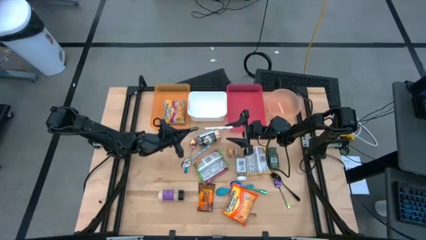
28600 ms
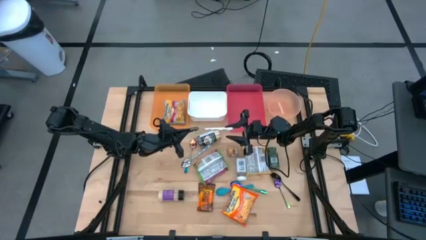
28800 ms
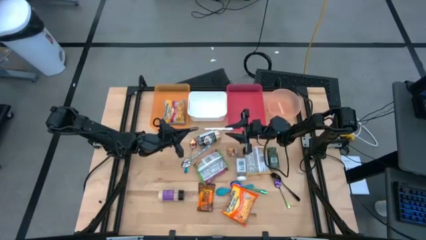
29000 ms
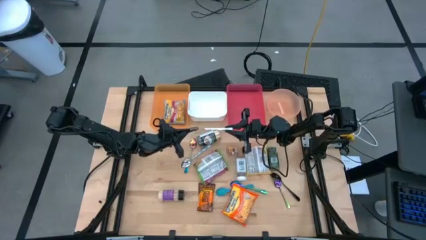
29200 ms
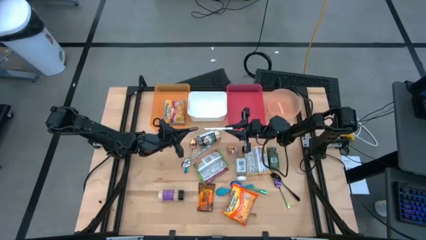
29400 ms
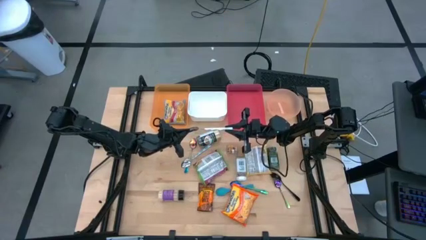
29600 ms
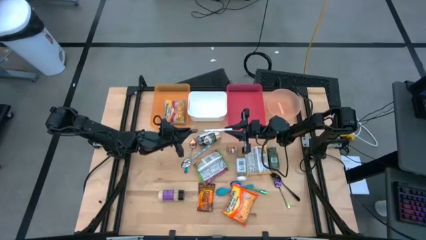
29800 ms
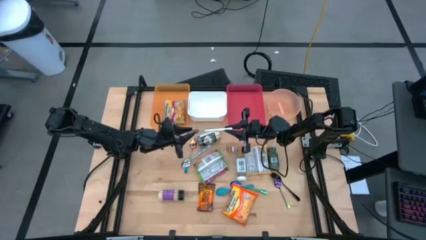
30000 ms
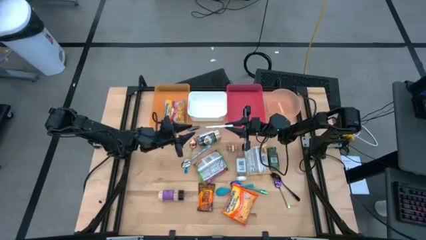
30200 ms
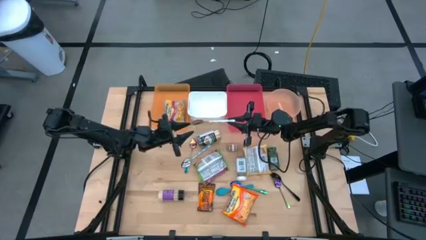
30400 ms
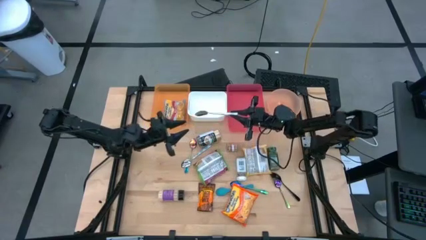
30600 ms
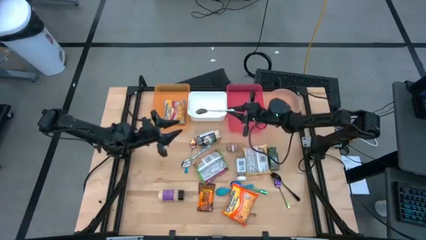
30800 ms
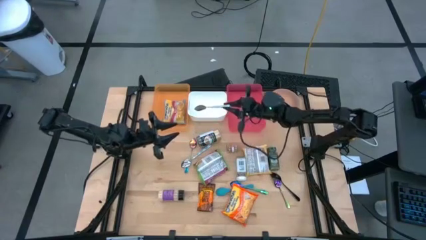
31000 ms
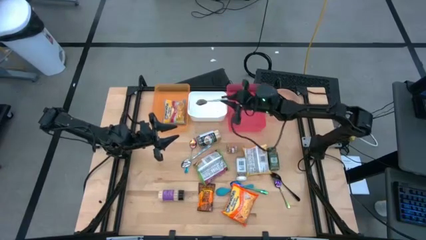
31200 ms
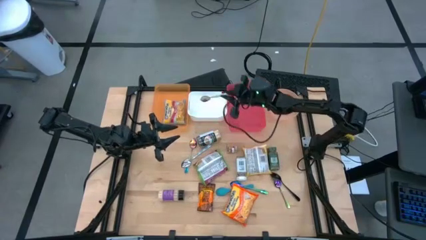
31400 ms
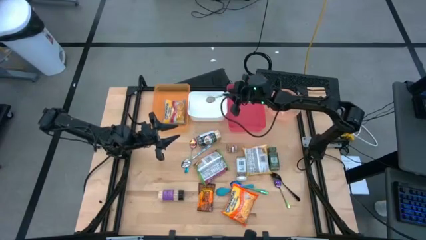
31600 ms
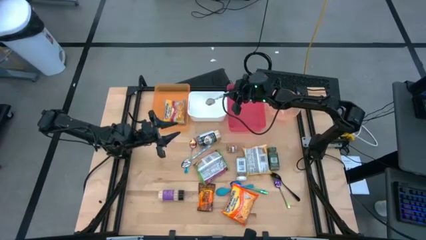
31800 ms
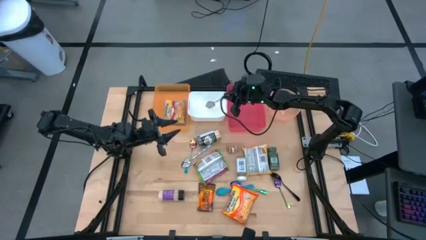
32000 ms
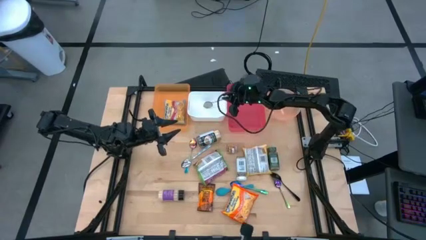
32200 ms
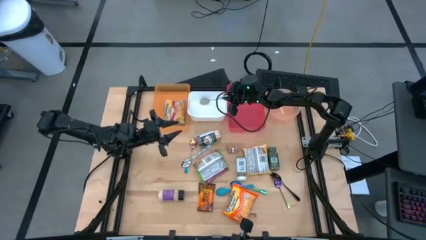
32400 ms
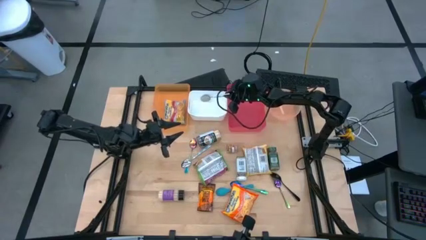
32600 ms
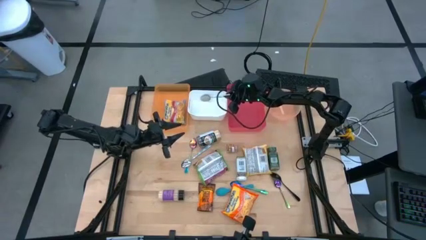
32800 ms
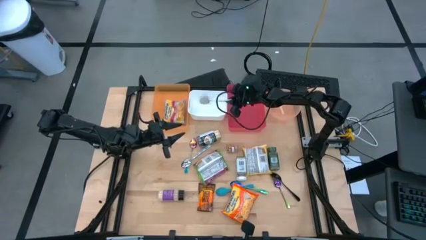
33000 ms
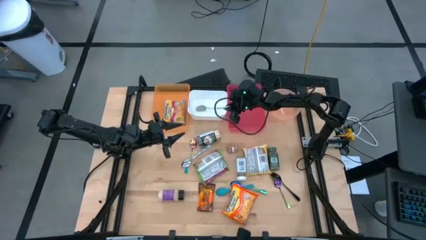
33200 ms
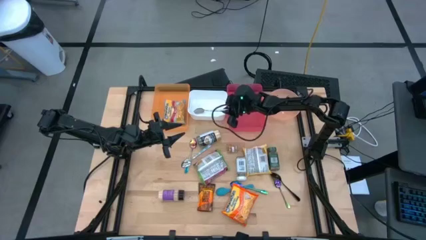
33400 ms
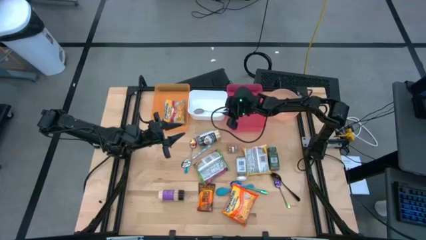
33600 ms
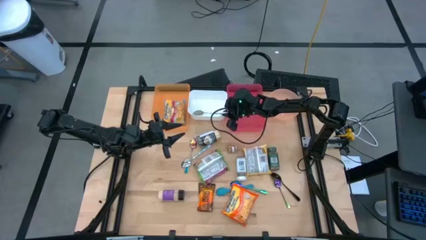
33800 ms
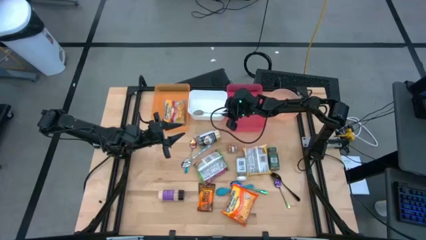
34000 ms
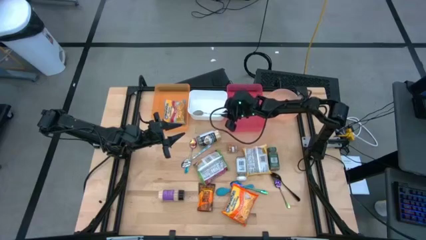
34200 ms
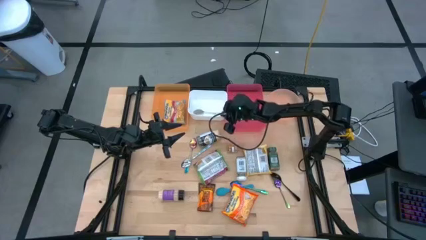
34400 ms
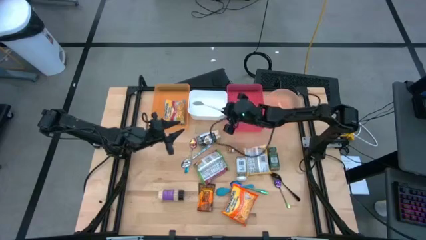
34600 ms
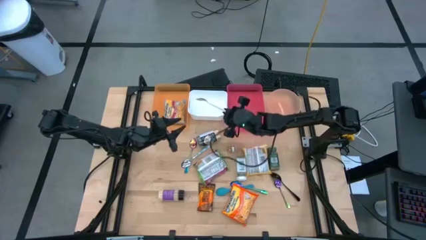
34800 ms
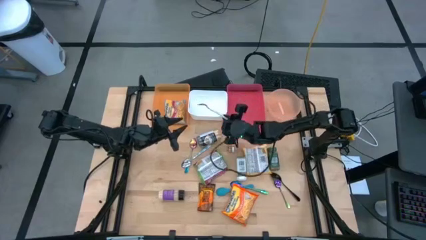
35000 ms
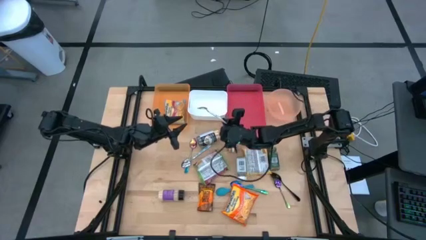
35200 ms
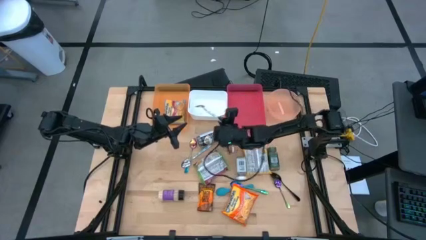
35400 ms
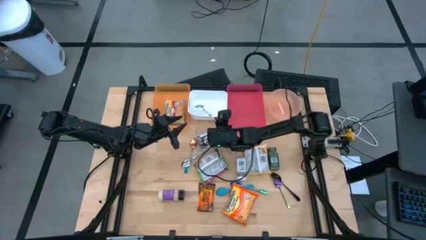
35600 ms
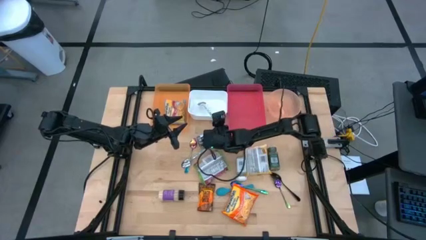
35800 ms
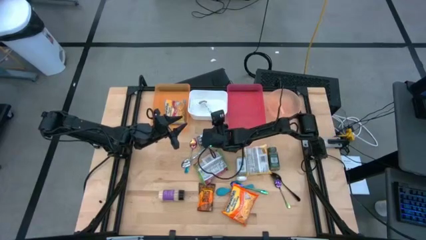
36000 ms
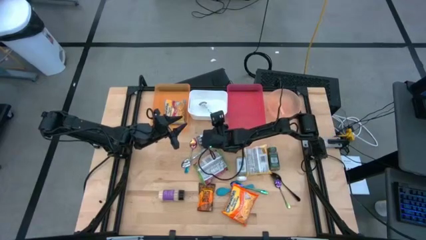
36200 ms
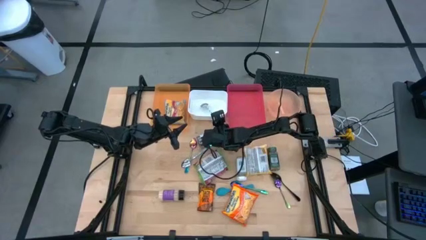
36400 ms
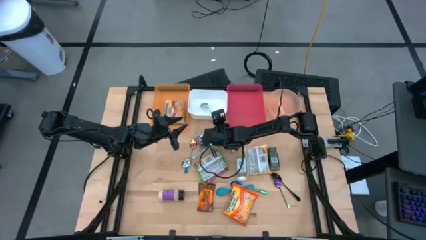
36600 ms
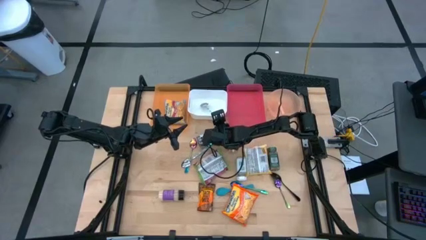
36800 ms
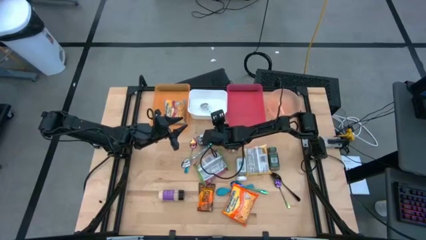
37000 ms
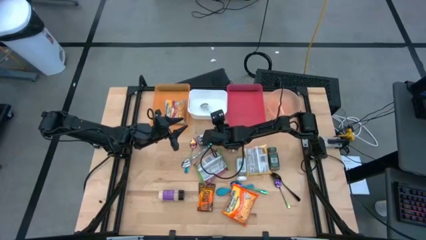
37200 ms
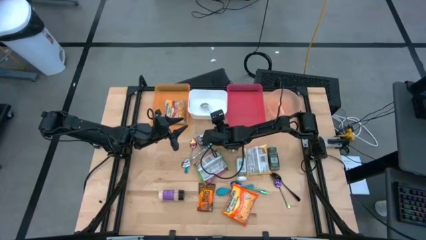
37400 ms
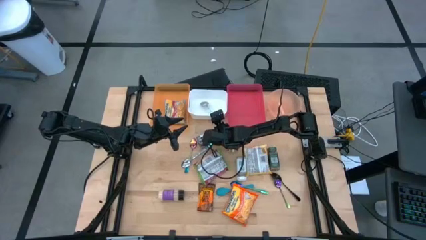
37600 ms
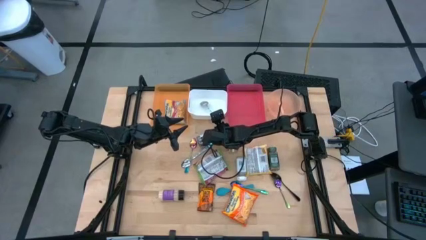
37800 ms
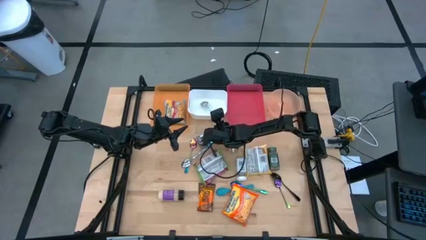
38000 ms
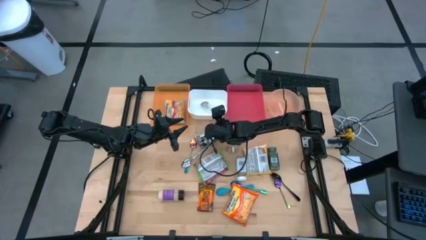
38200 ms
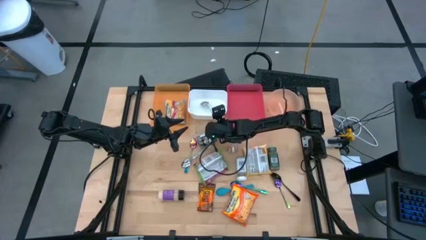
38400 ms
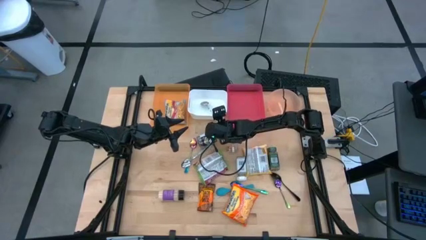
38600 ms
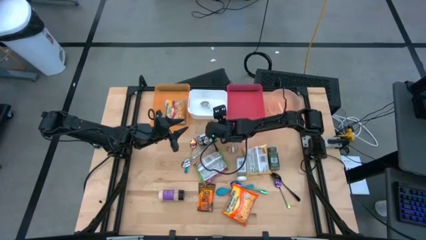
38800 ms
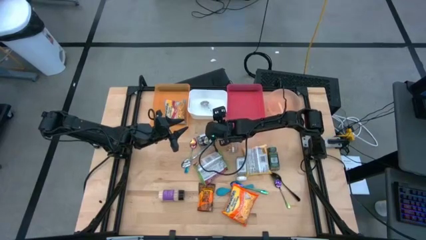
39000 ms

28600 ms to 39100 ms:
Task: Pick & Place Food Item
Put the top blue patterned spoon into the white bin
